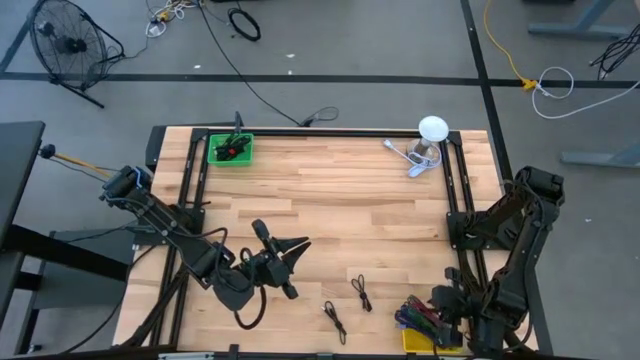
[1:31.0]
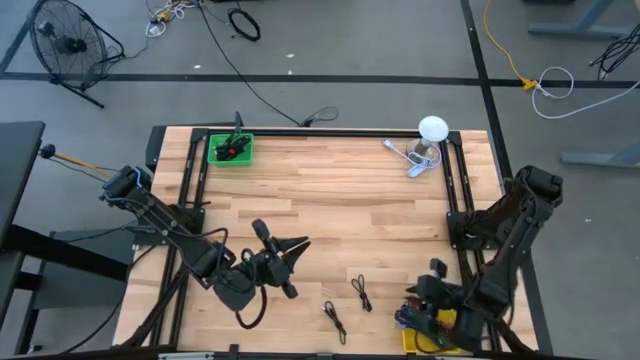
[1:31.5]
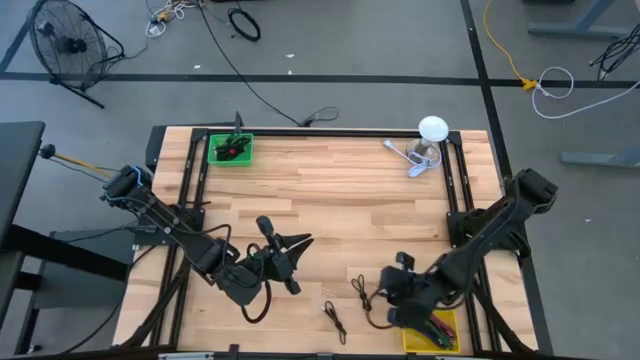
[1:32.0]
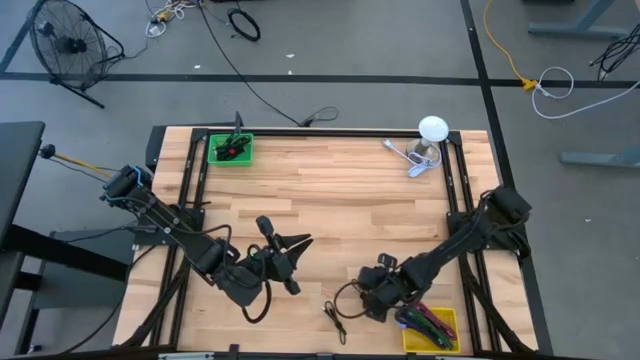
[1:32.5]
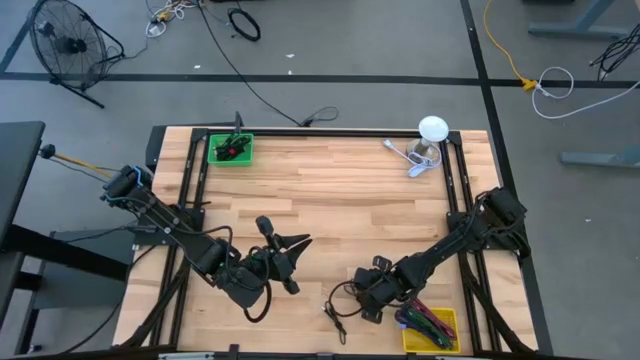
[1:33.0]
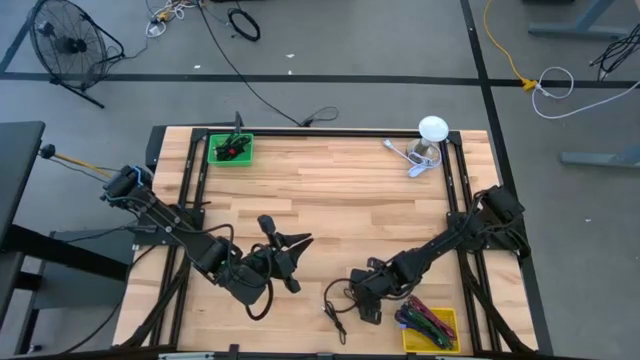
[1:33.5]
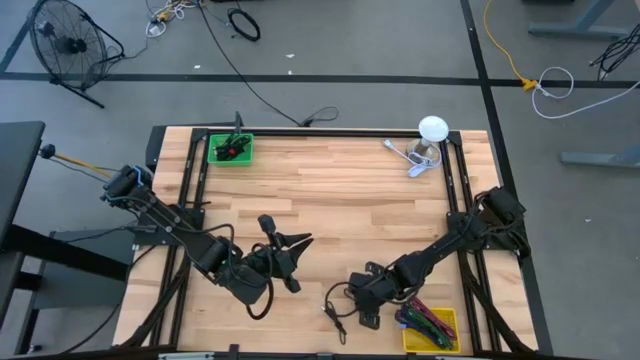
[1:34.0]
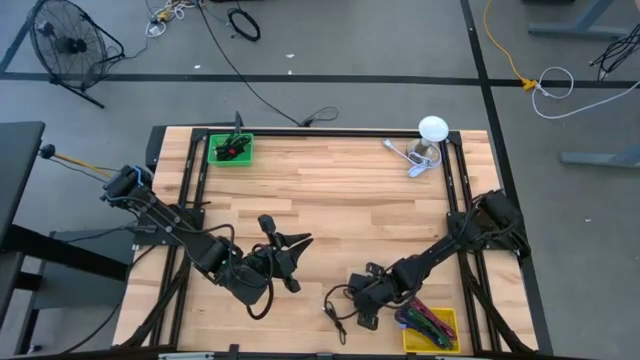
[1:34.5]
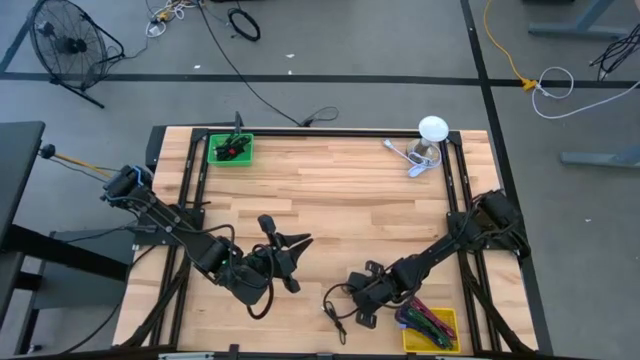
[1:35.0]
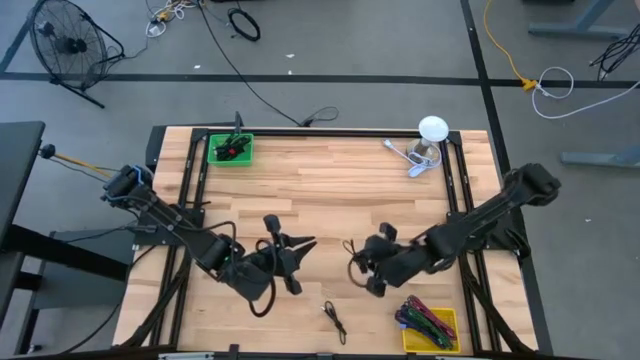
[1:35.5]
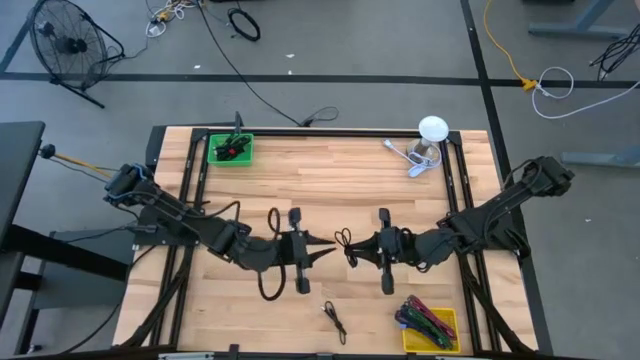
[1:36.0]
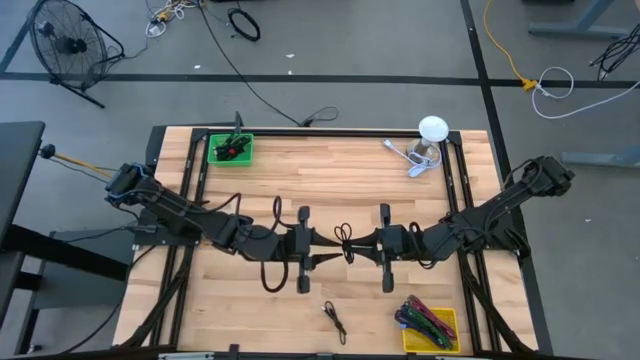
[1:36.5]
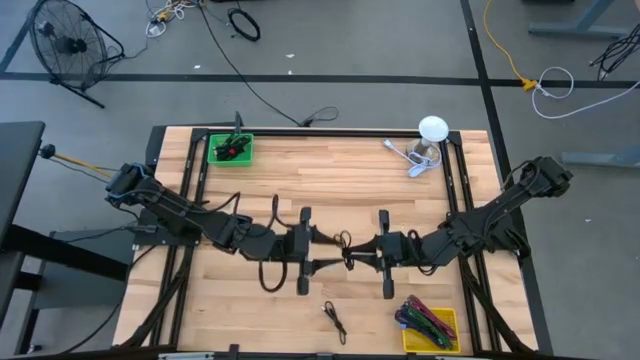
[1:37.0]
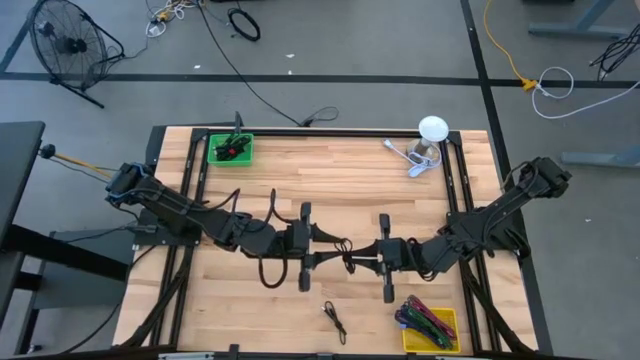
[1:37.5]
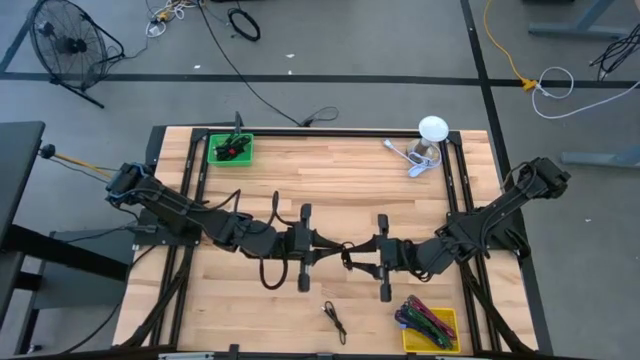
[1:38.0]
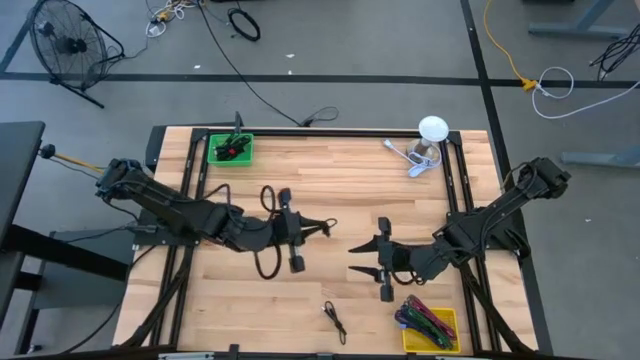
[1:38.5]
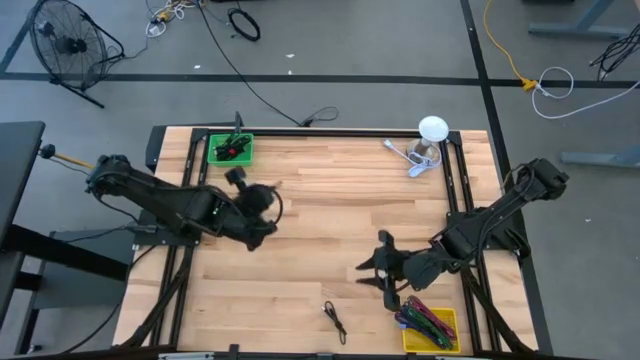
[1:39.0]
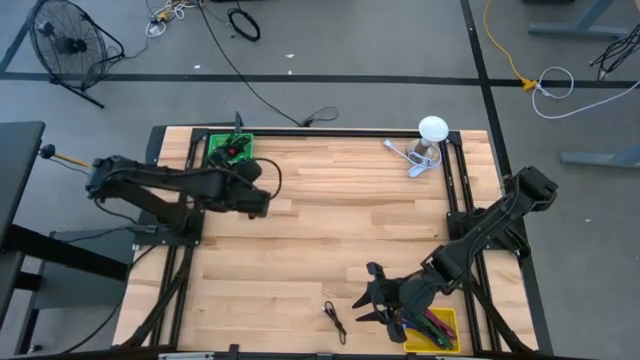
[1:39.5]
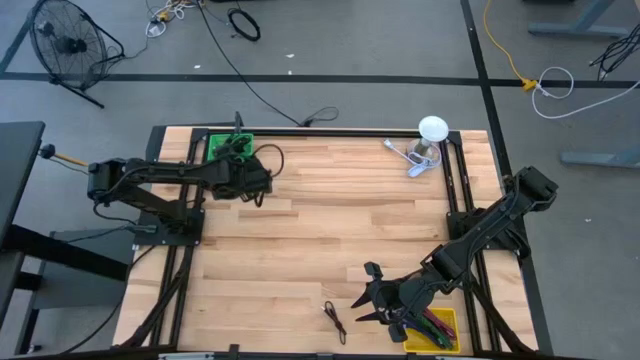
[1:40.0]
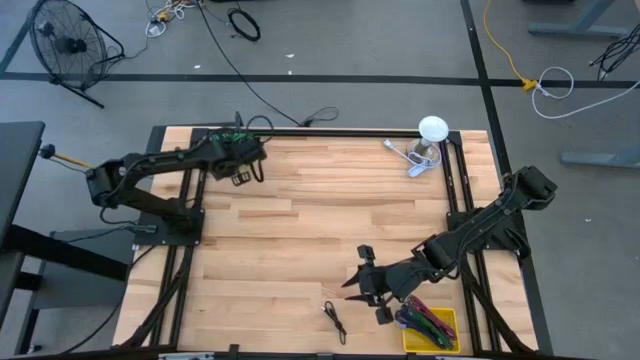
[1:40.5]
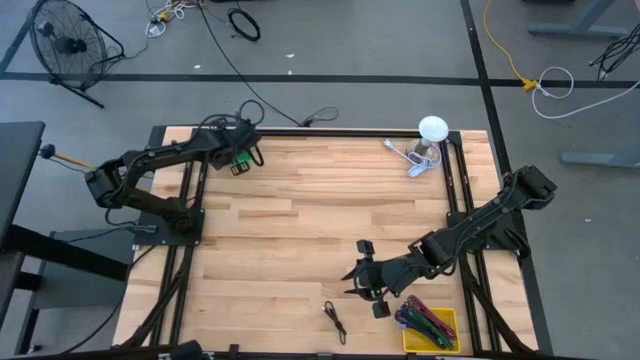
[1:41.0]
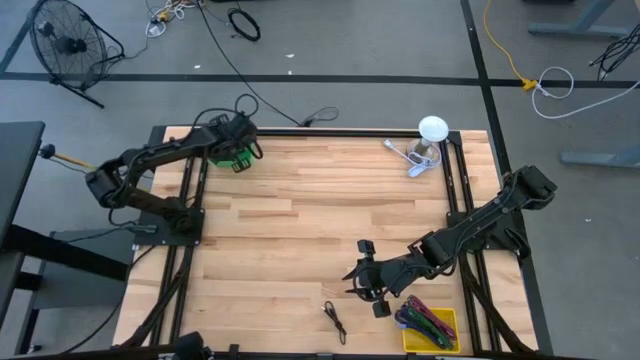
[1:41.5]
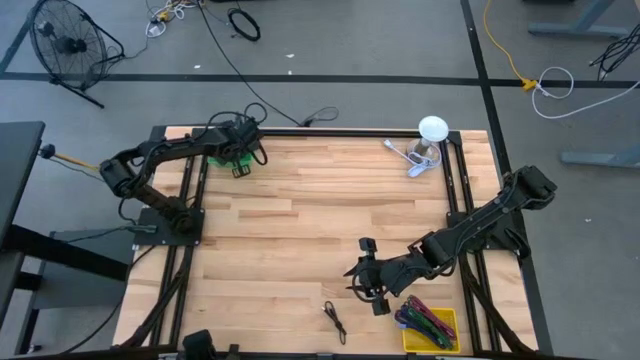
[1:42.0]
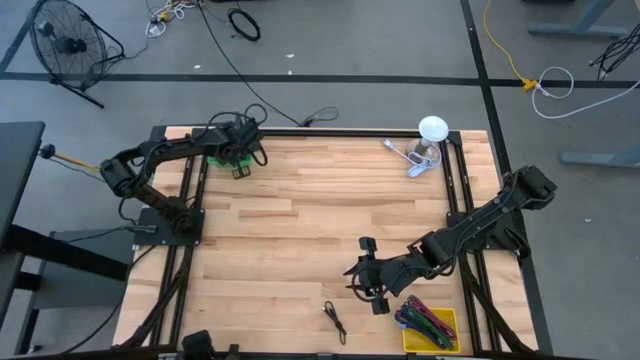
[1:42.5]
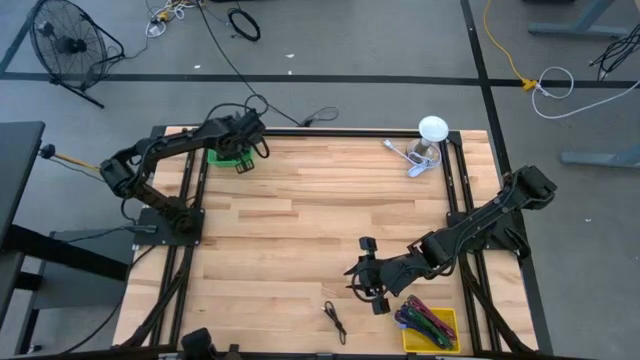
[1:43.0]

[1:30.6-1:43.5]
Task: Pick & Place USB Port
Put the black charger cable into the green bin

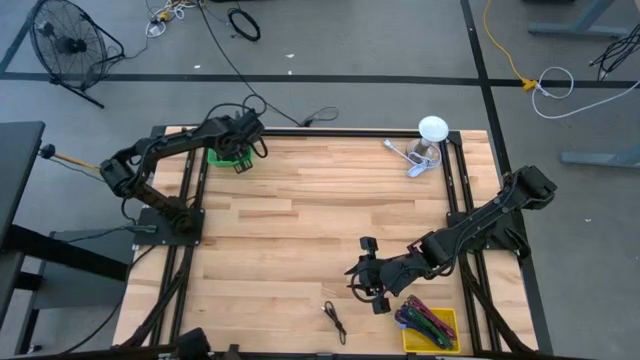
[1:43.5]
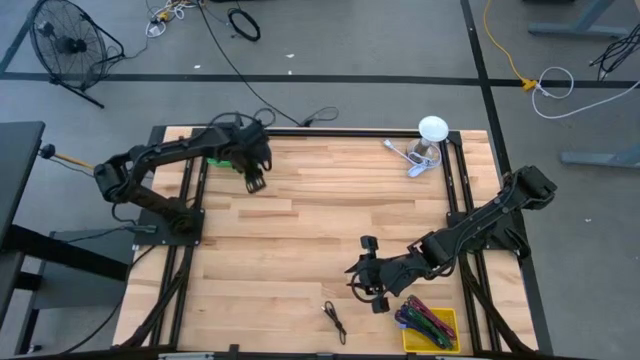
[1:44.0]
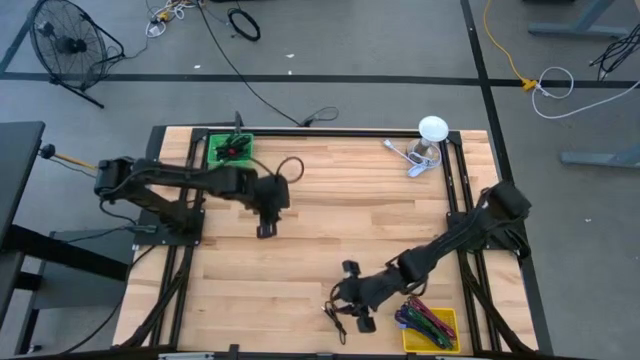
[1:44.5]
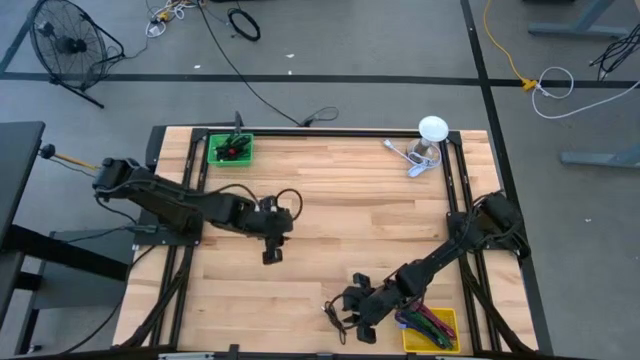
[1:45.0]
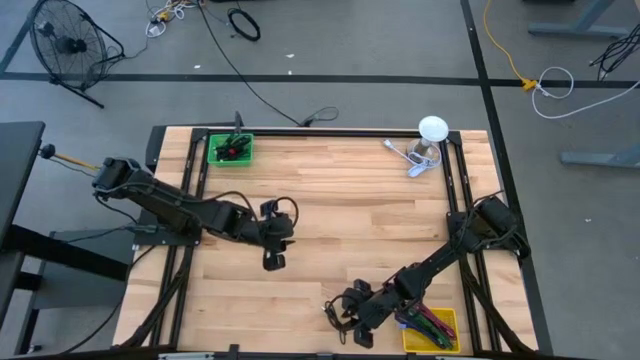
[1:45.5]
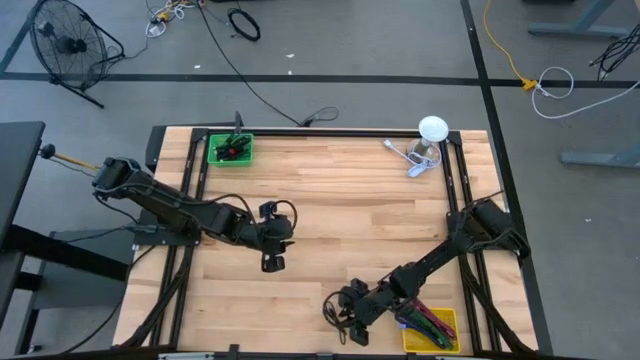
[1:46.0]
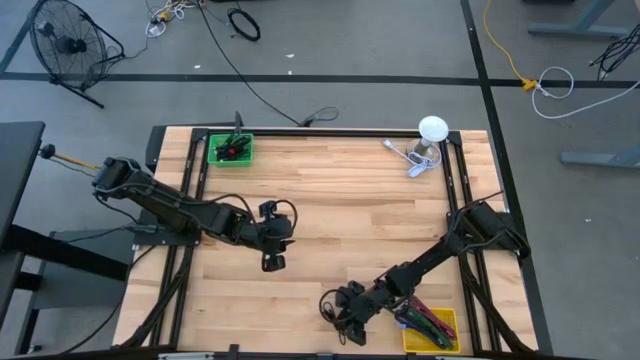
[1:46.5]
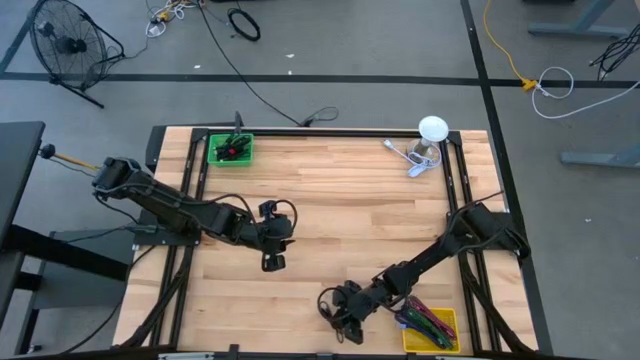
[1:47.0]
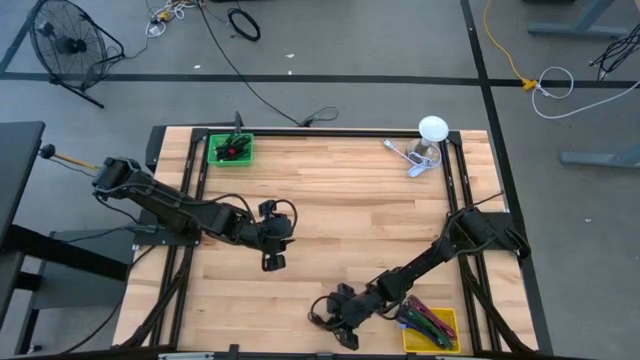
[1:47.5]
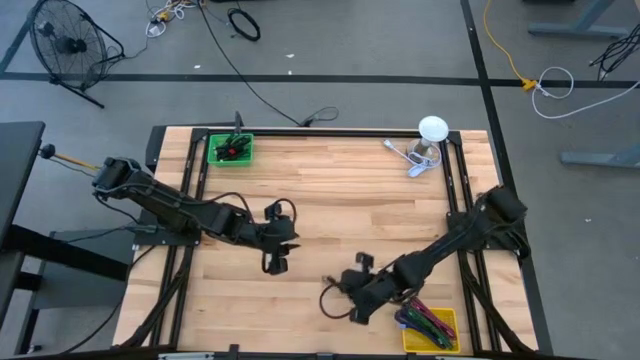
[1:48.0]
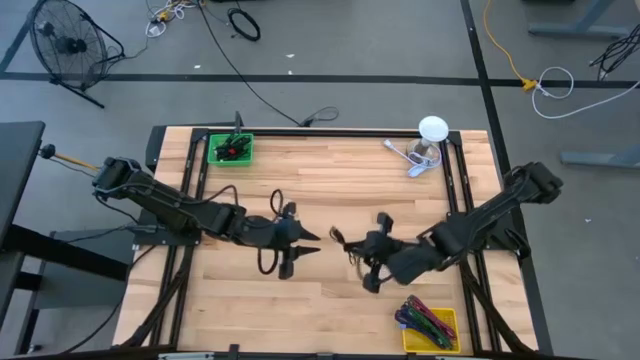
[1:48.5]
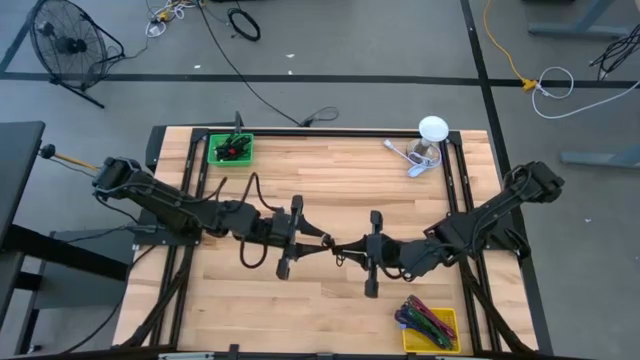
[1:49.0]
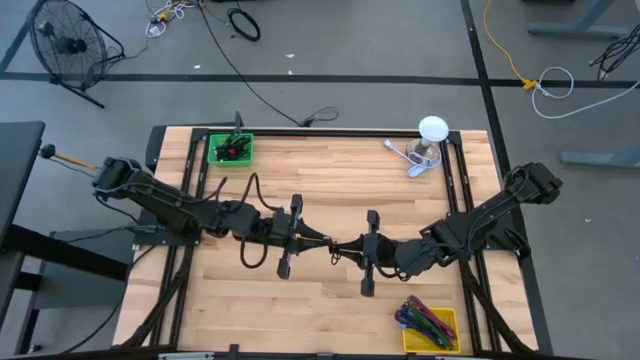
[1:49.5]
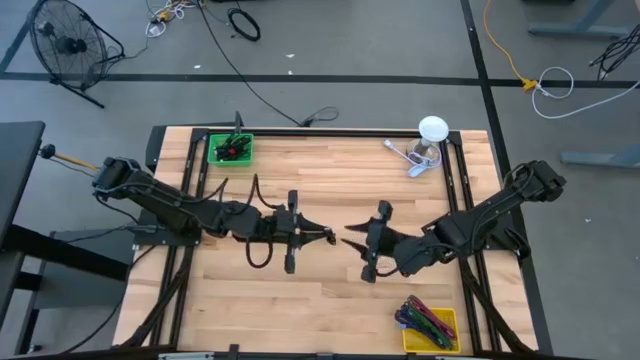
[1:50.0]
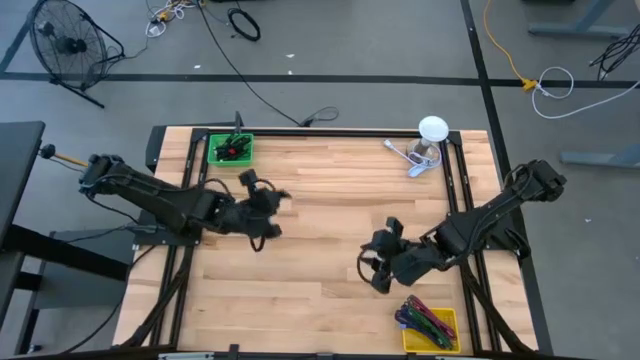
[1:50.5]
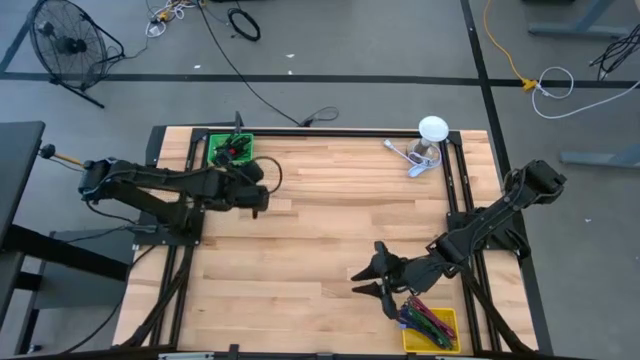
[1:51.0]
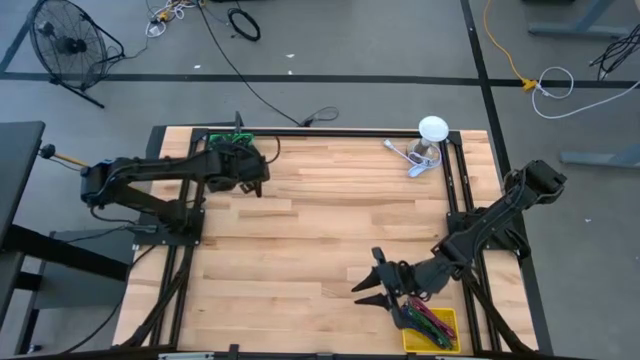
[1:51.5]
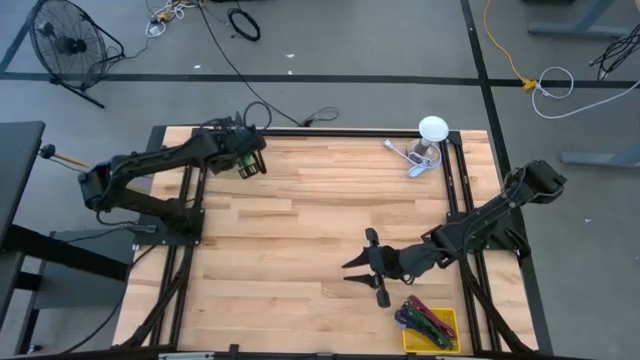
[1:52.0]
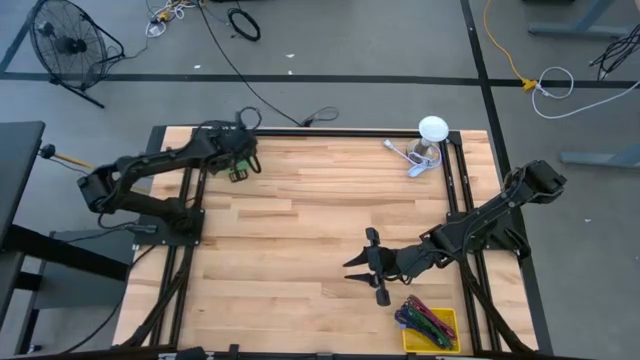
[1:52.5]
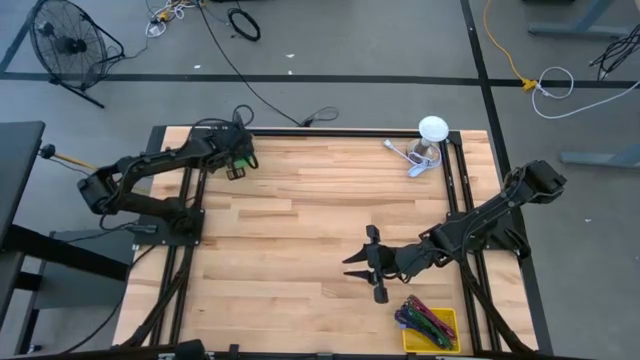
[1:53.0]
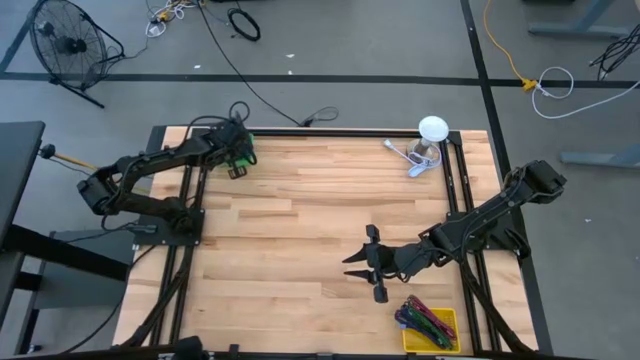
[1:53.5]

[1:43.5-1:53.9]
Put the black charger cable into the green bin
